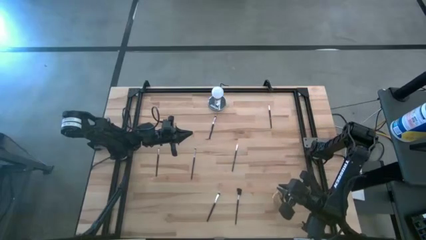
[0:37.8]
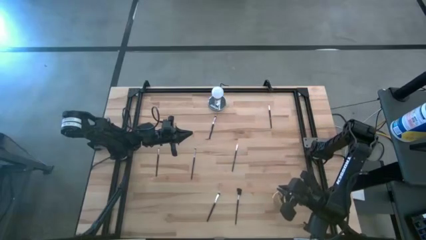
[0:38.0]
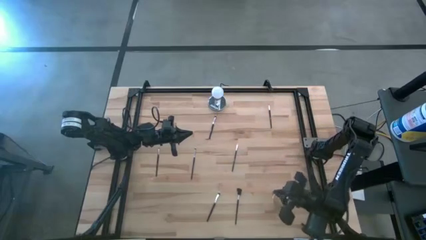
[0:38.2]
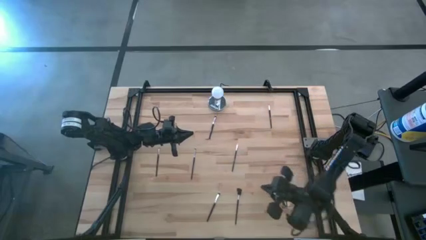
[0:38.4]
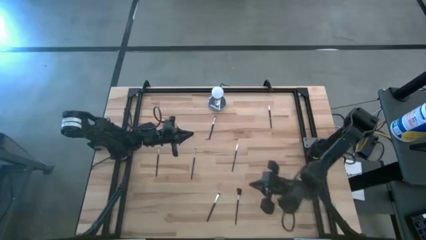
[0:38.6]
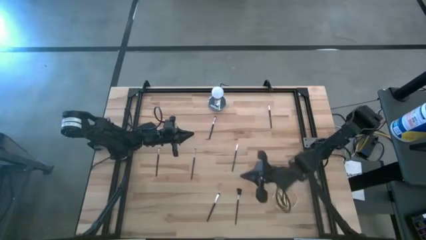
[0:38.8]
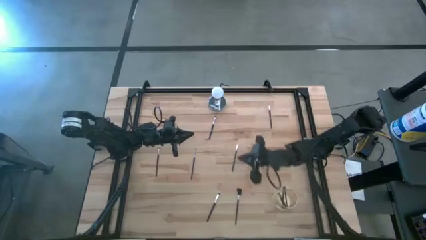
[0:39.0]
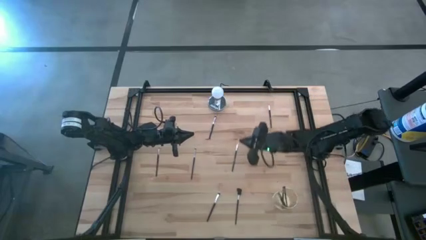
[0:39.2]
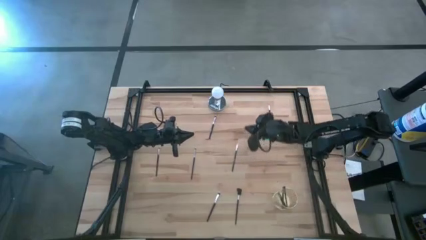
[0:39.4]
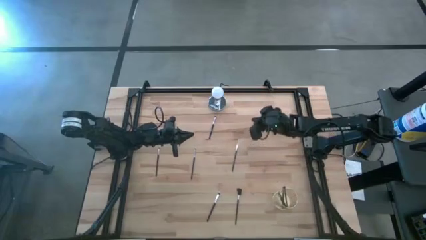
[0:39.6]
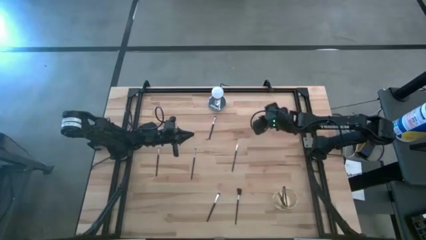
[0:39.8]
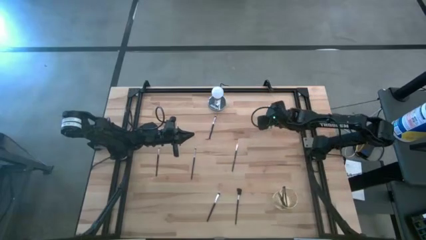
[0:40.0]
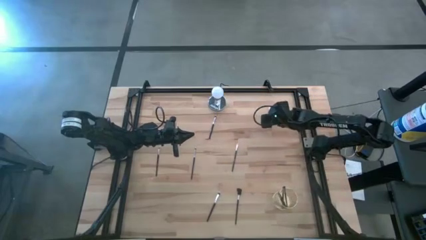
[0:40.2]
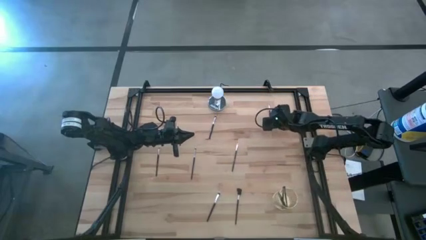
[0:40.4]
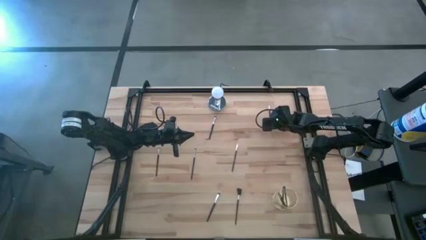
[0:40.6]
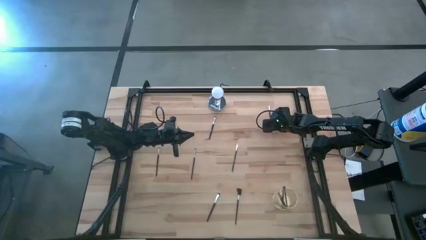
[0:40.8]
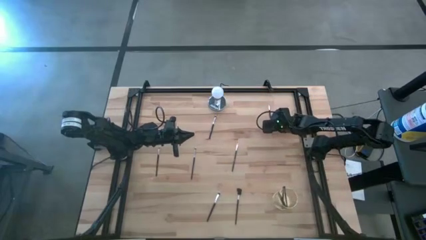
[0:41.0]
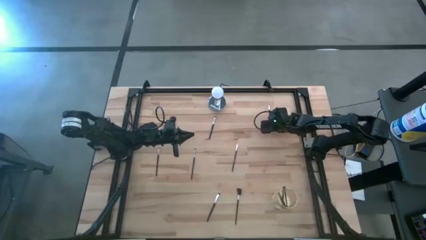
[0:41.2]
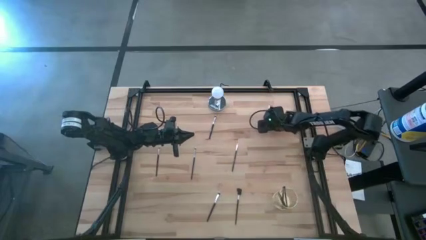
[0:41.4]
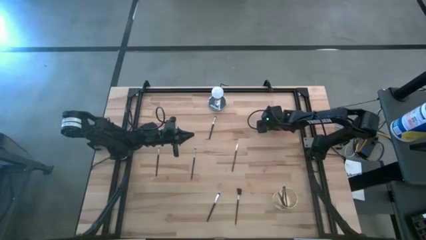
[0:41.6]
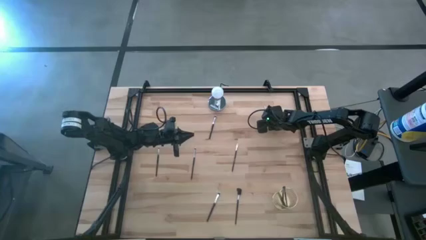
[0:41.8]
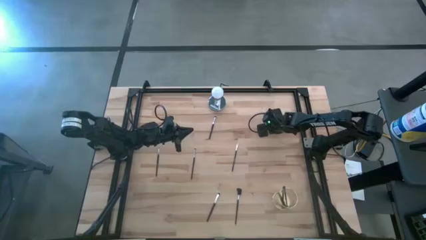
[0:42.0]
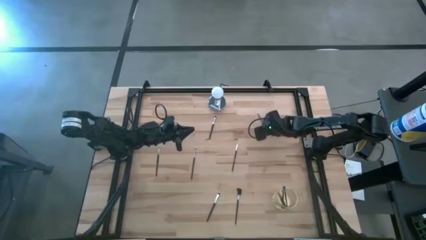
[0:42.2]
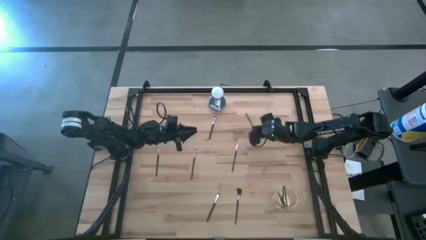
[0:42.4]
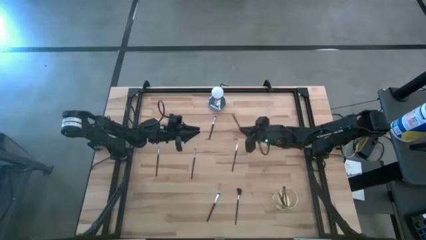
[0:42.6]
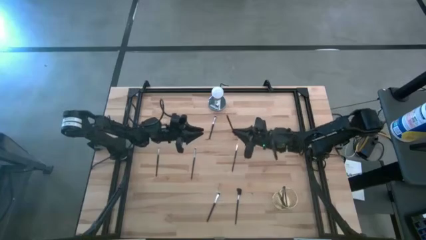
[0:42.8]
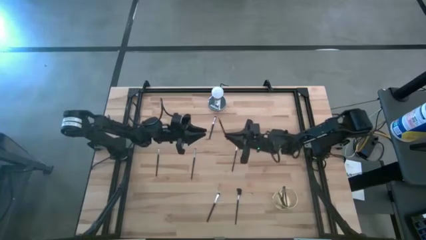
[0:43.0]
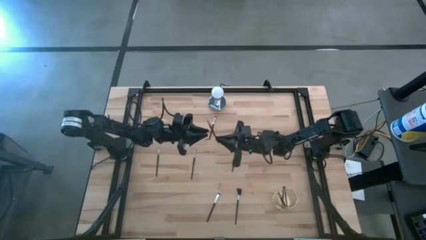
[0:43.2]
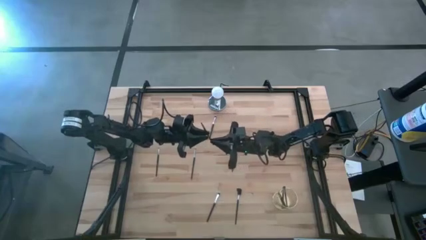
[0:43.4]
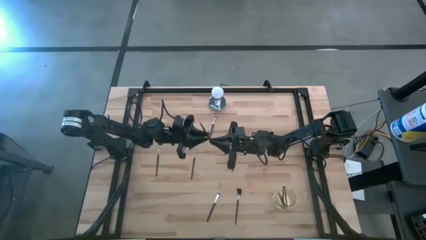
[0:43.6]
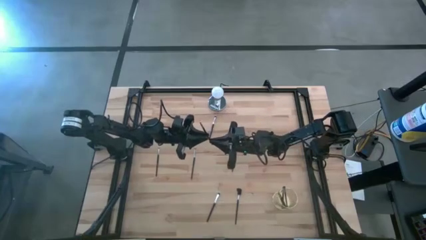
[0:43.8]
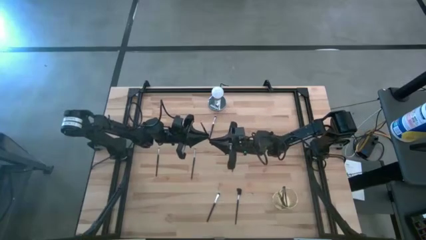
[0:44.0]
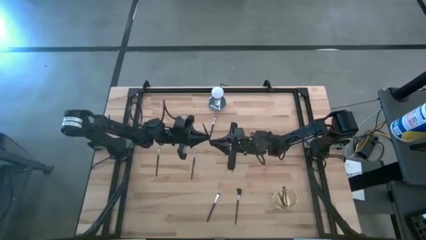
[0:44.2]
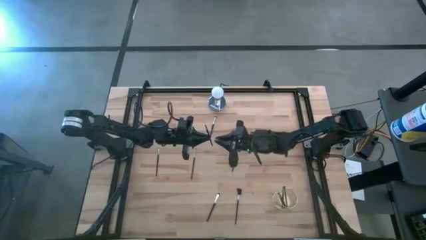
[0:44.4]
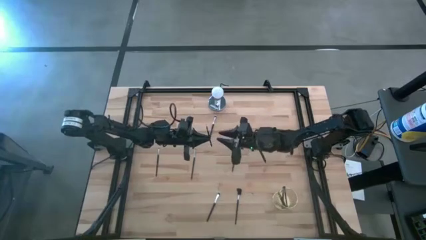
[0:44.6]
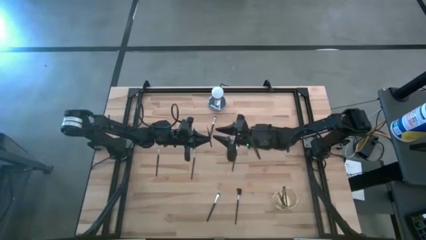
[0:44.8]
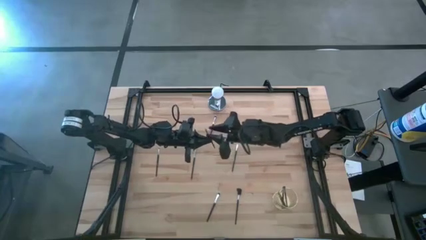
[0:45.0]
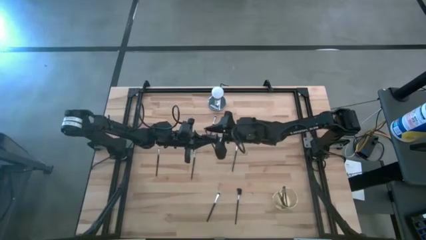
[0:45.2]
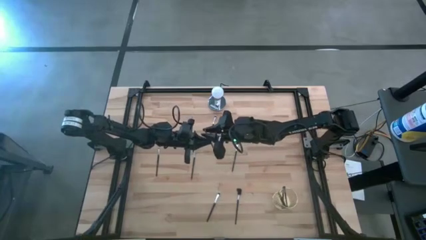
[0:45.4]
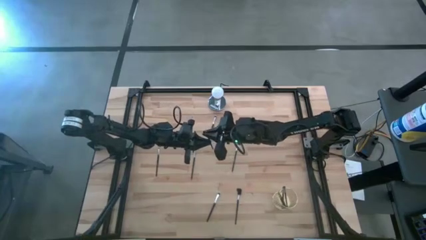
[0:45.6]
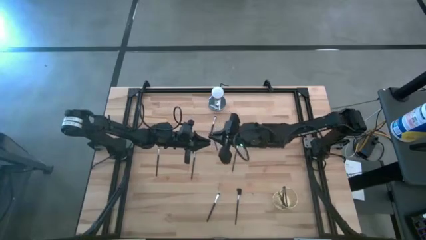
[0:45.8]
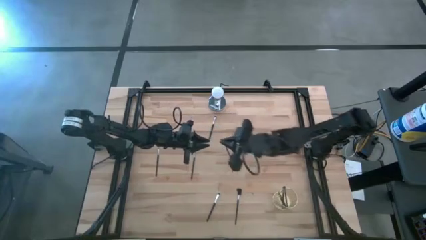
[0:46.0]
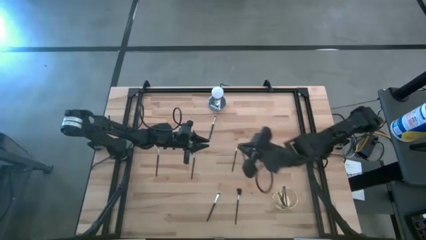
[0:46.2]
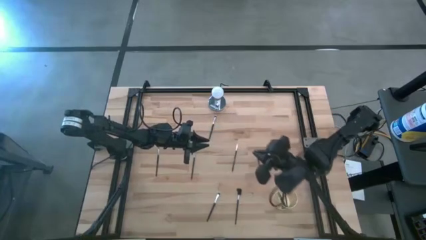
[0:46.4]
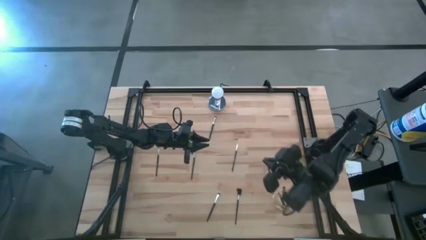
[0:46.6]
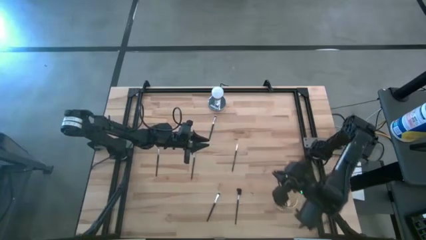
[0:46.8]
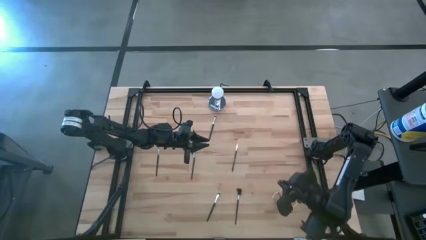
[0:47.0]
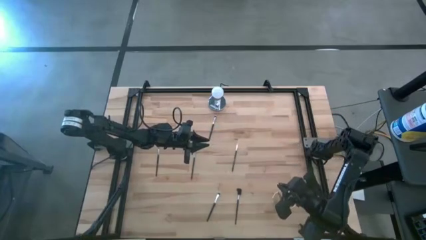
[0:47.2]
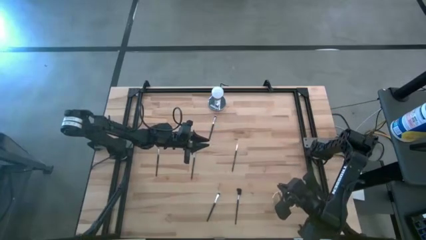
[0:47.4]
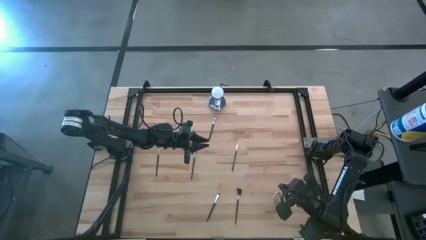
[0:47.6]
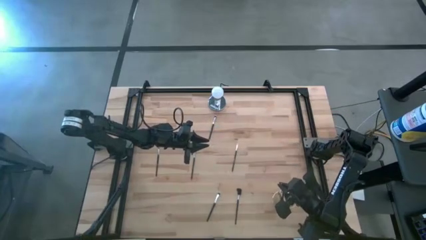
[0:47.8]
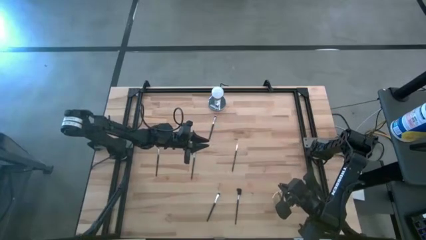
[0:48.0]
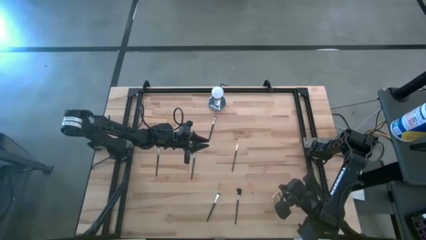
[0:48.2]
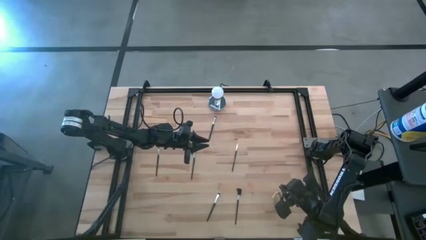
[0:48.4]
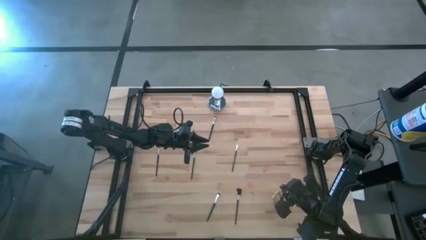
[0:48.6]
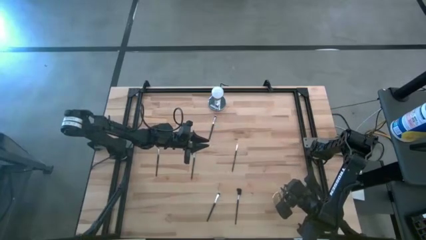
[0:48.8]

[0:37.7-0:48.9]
Task: Pick & Place Makeup Supplies
Put the silver makeup brush into the gold makeup holder

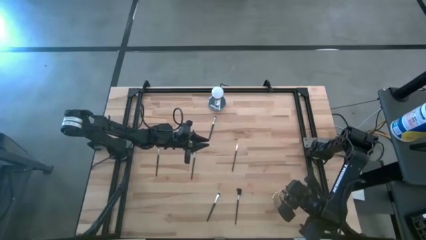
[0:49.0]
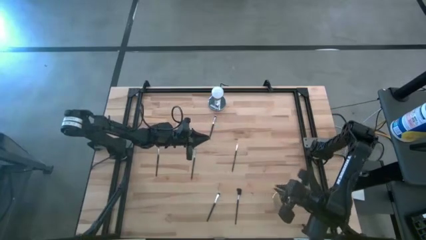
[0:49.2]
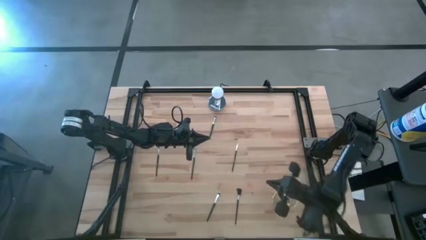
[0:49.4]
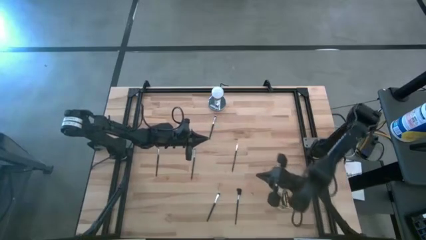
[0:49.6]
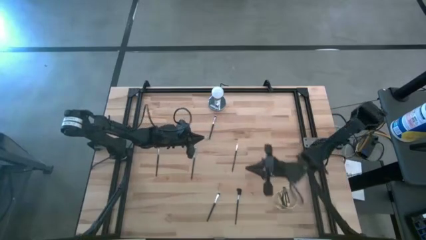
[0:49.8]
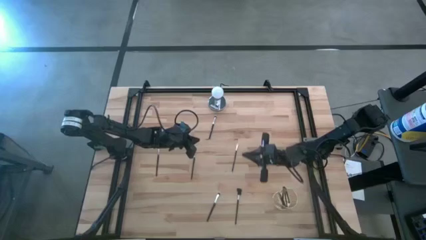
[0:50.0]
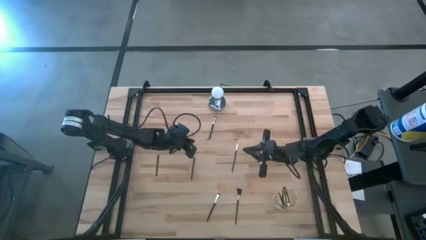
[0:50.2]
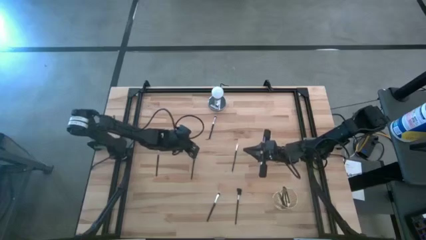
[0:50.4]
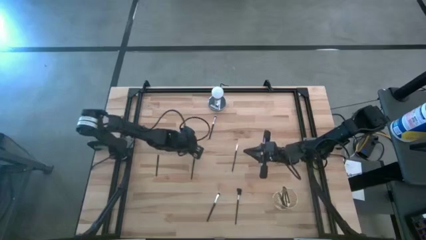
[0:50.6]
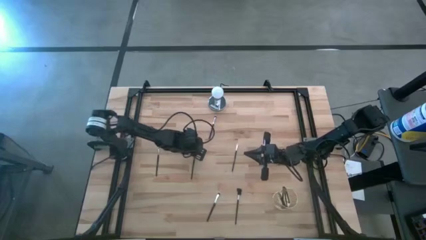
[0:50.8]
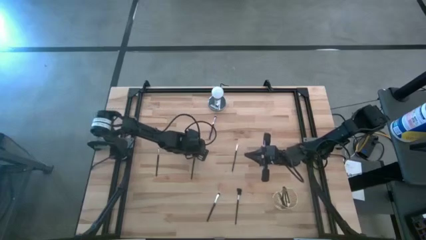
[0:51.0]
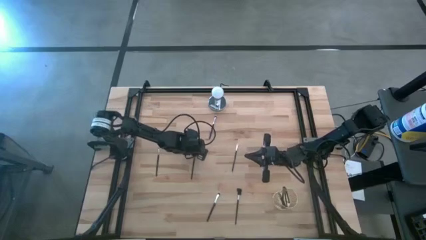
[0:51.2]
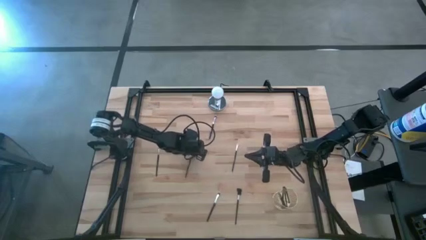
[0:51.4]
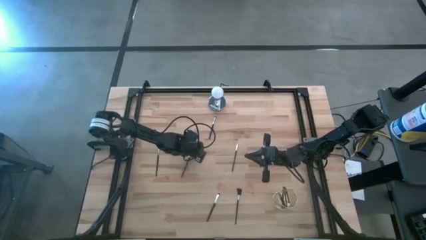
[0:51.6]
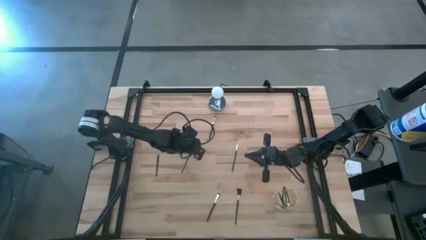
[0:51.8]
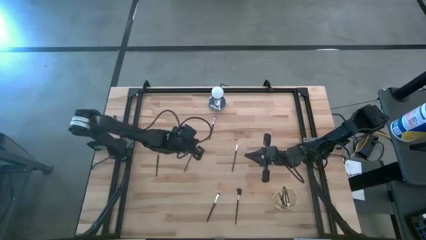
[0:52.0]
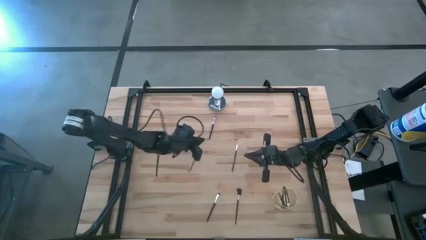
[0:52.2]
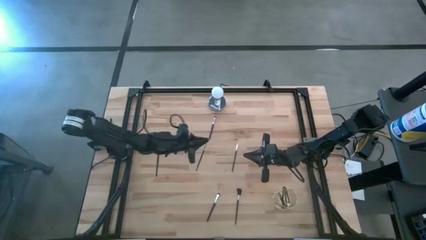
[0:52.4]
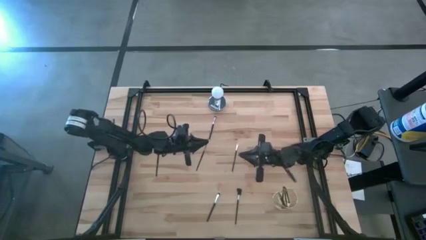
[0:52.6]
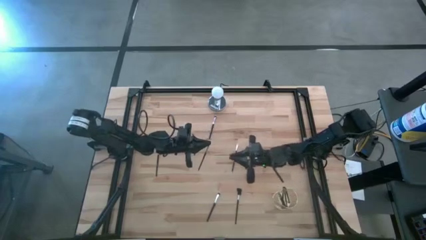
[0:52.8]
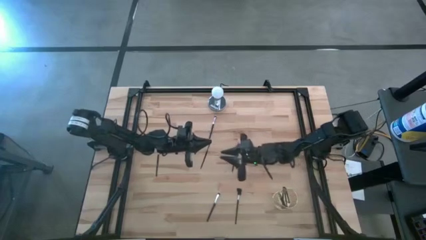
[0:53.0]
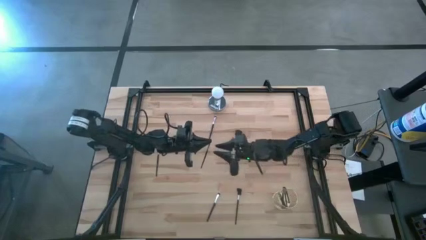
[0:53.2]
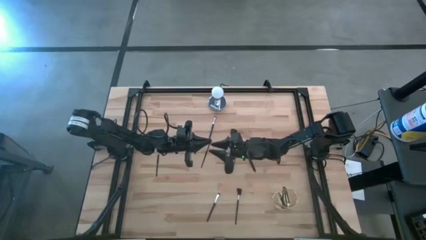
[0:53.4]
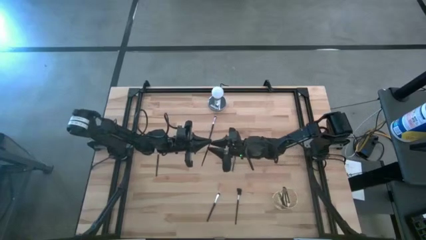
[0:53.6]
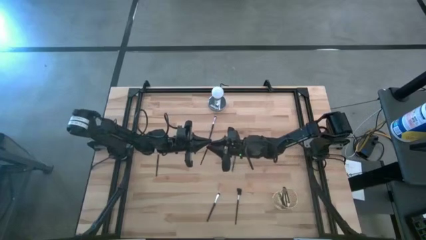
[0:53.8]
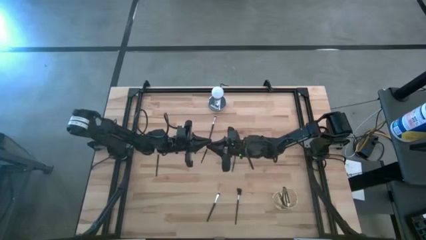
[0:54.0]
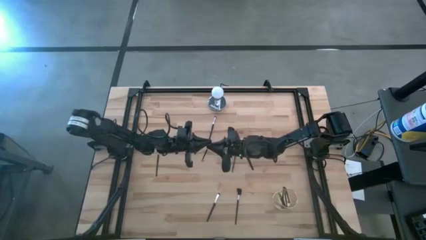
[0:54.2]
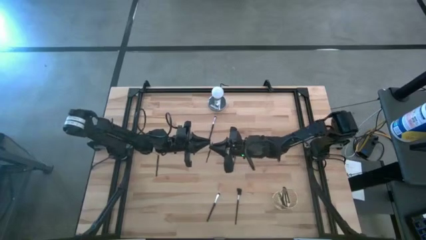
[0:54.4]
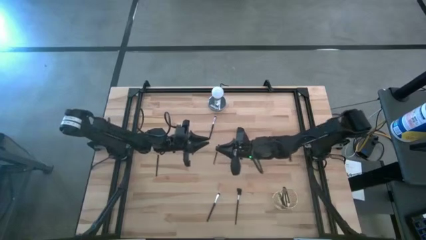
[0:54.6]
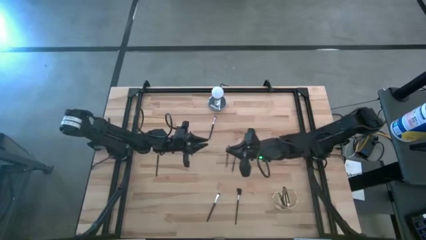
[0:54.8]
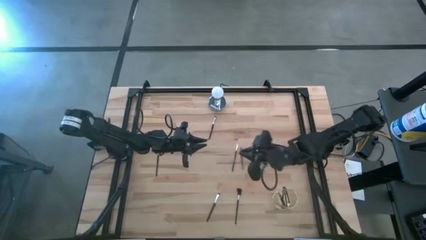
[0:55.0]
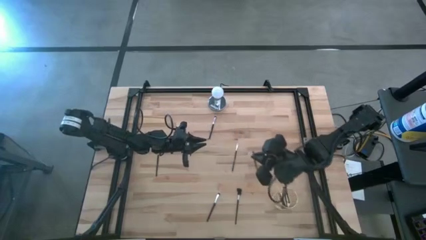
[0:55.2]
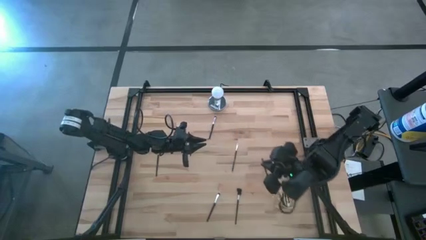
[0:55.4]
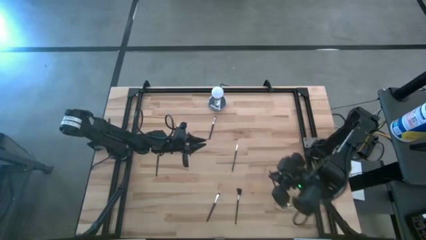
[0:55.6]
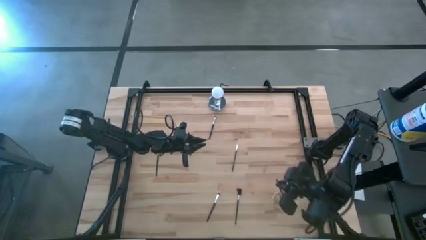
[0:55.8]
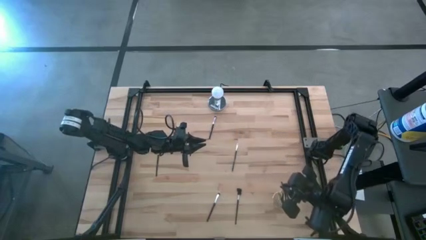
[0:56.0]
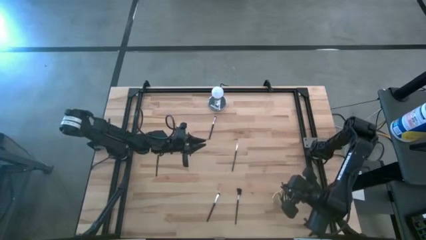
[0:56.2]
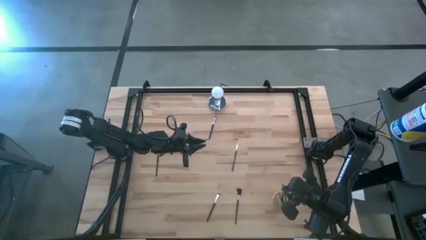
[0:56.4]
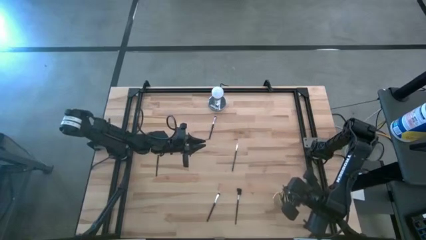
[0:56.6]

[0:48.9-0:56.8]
Put the silver makeup brush into the gold makeup holder
